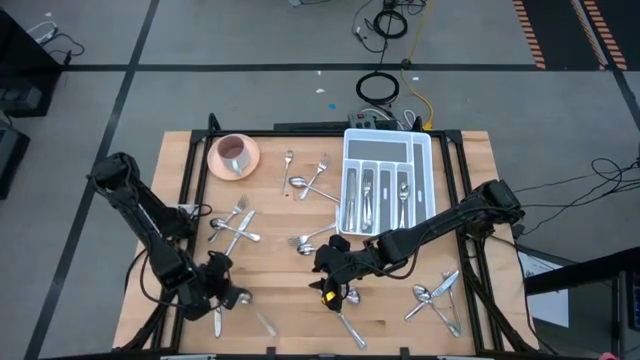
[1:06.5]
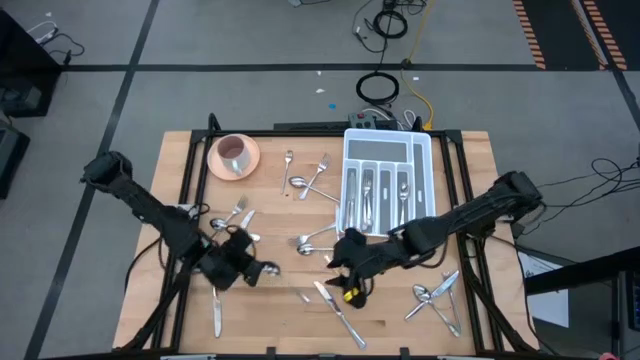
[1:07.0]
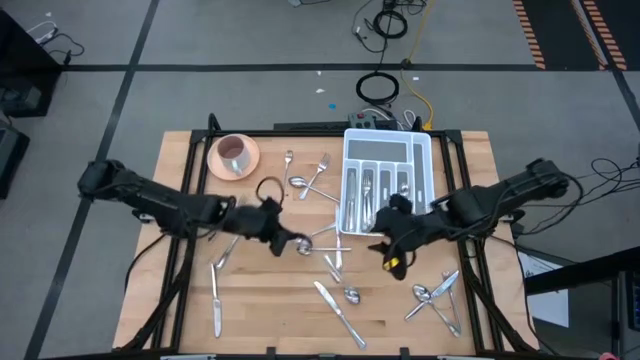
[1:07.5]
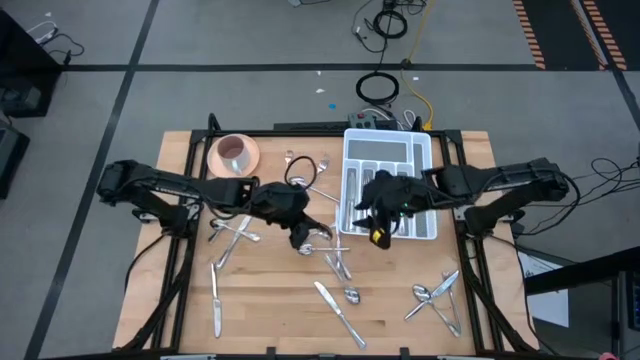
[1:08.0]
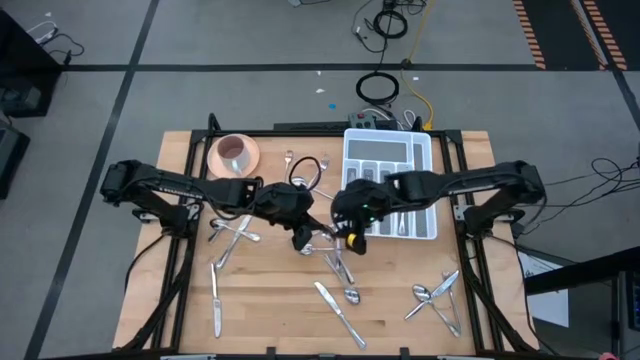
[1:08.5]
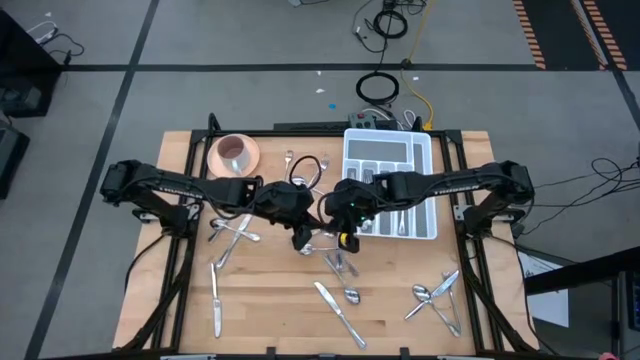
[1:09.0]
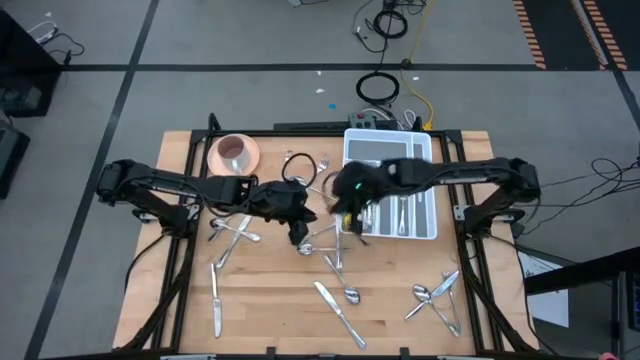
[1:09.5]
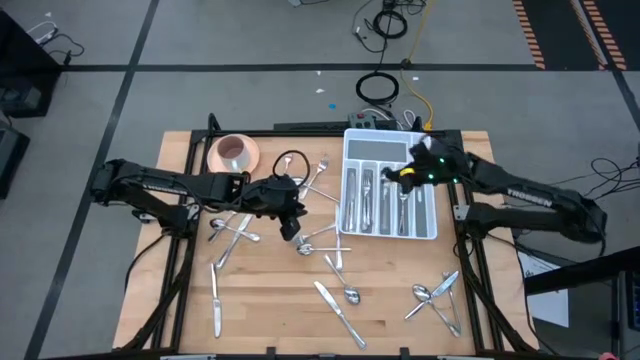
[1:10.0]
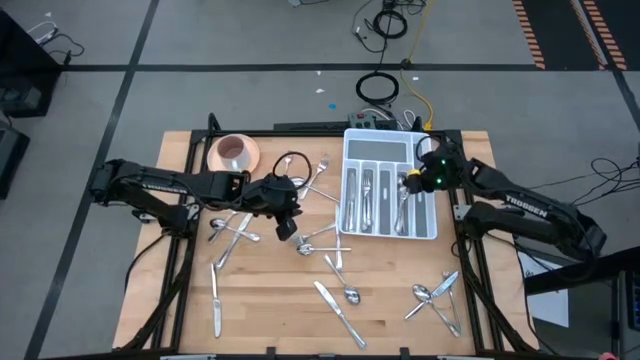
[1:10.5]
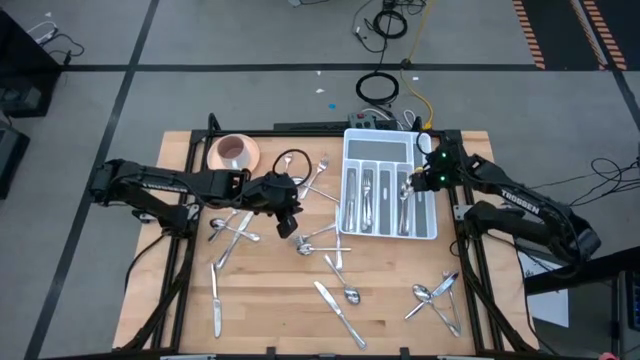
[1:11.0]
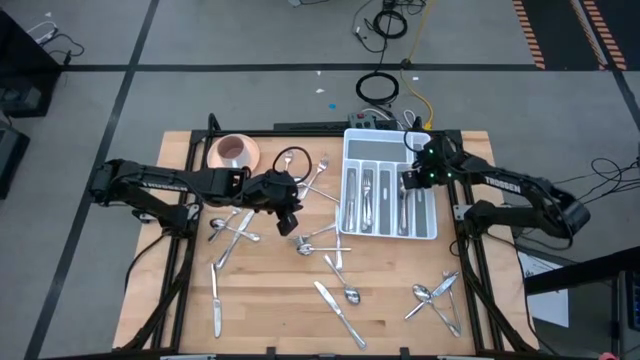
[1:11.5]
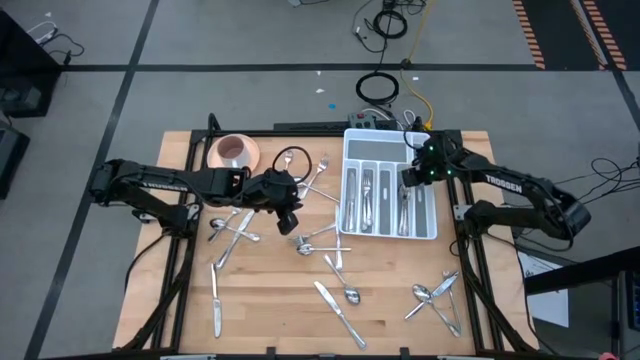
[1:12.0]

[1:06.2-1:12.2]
Task: Sort silverware
Put the silver spoon into the white silverware tray

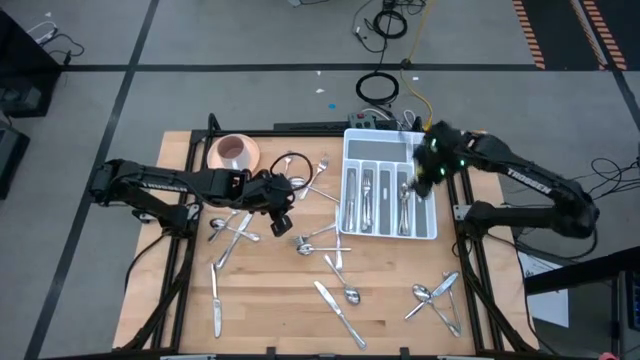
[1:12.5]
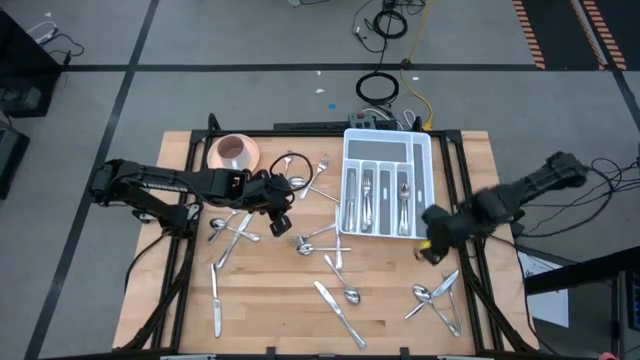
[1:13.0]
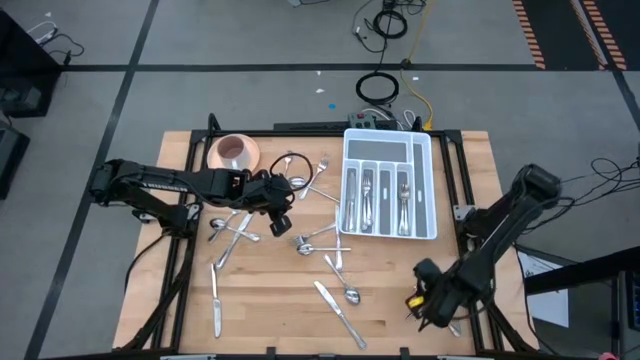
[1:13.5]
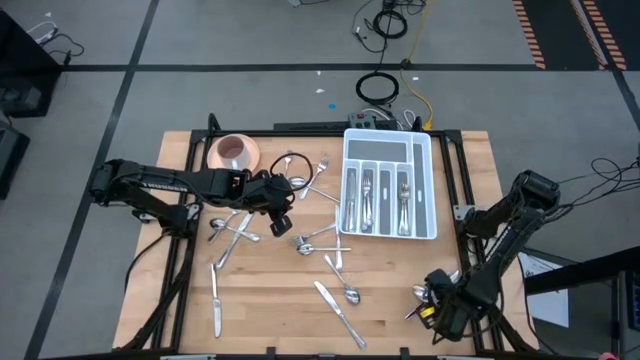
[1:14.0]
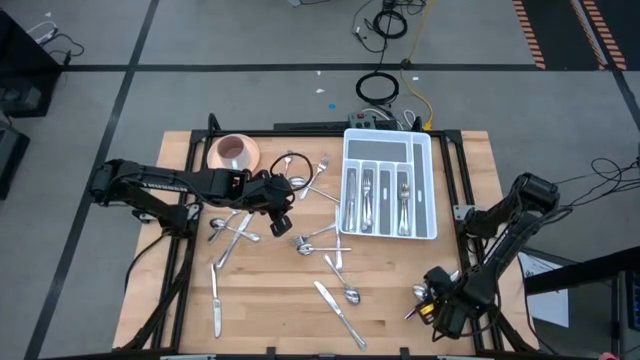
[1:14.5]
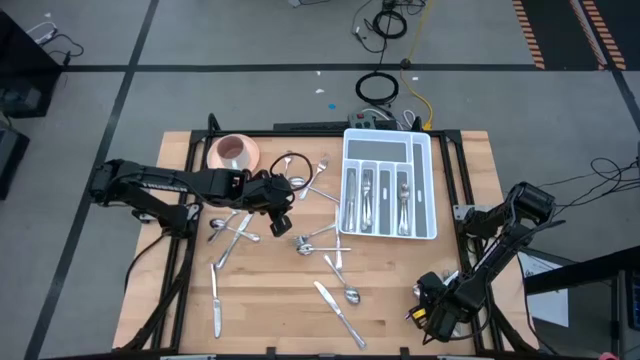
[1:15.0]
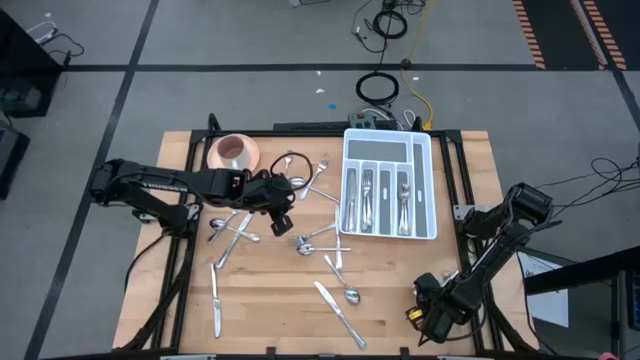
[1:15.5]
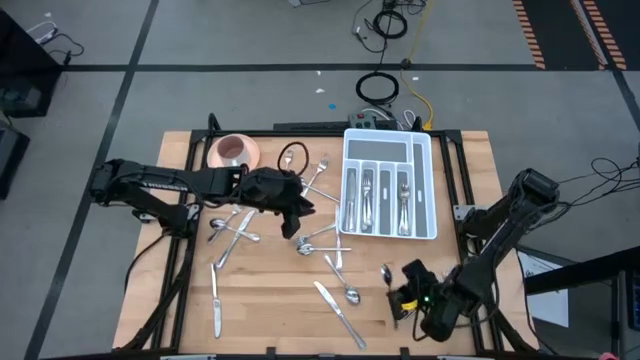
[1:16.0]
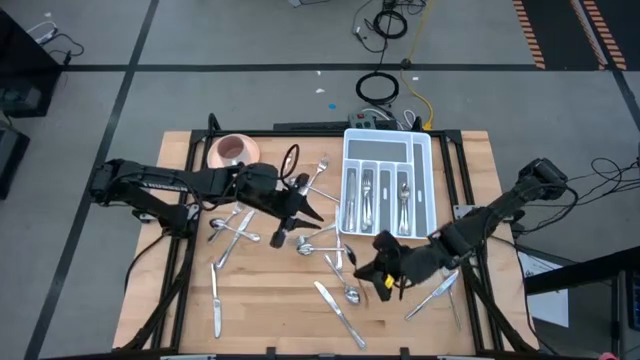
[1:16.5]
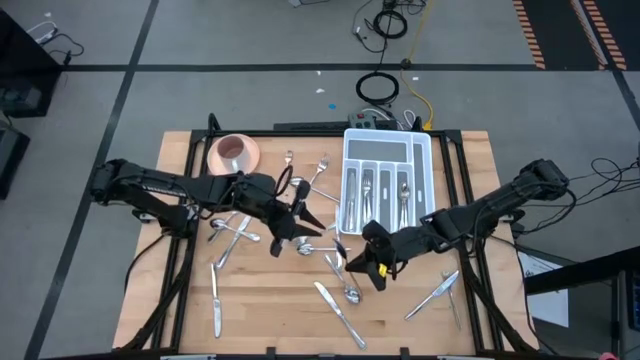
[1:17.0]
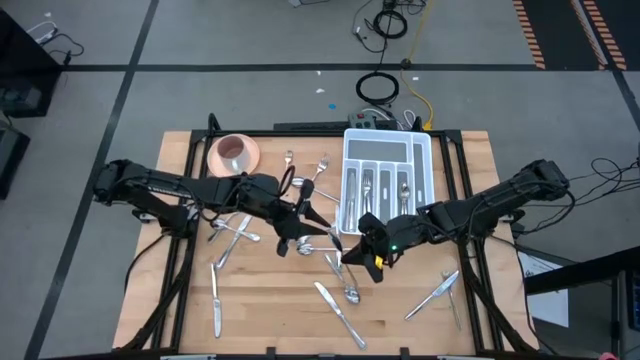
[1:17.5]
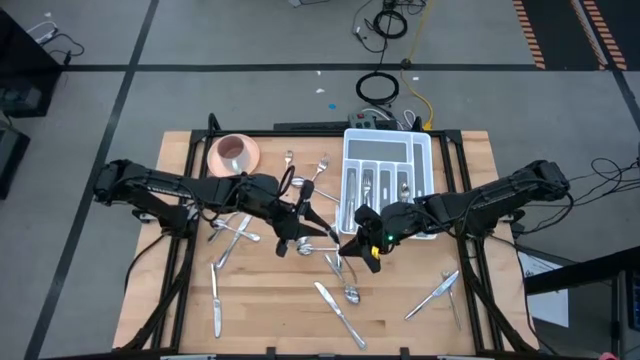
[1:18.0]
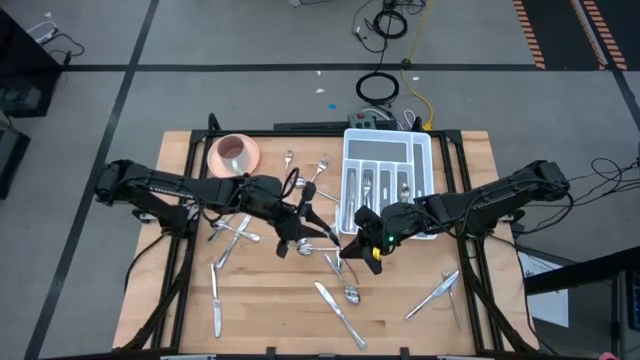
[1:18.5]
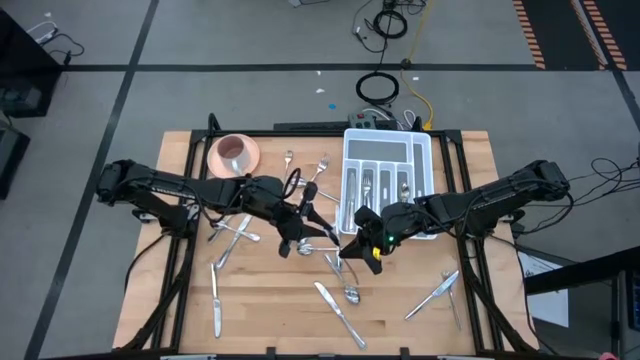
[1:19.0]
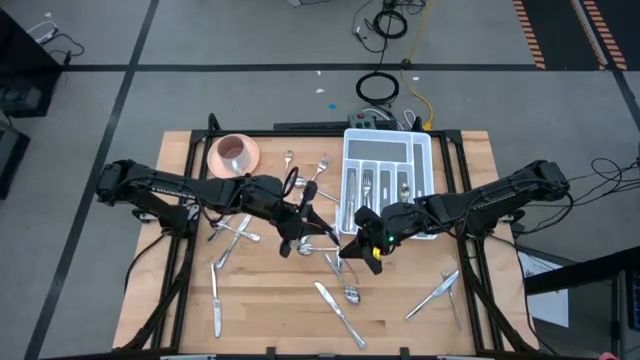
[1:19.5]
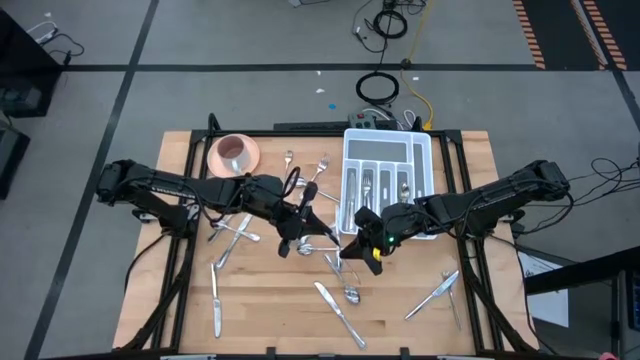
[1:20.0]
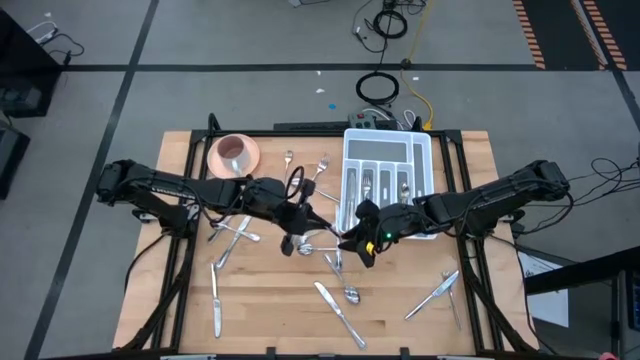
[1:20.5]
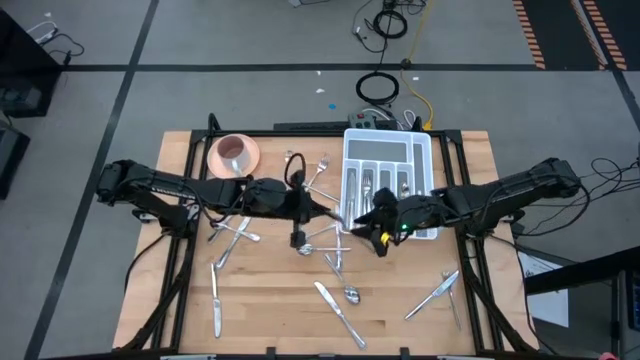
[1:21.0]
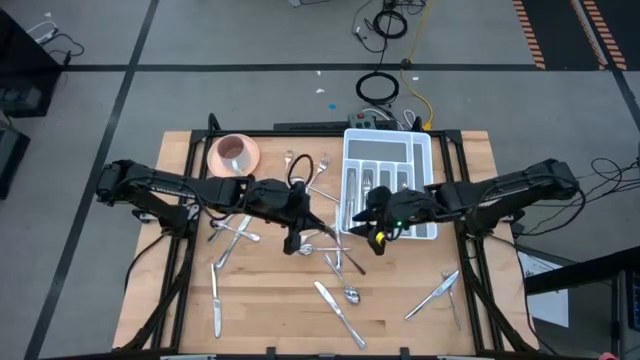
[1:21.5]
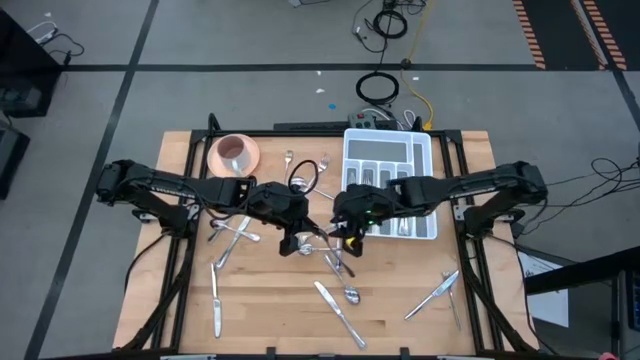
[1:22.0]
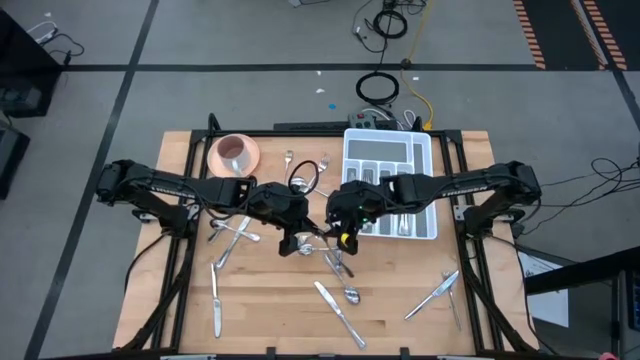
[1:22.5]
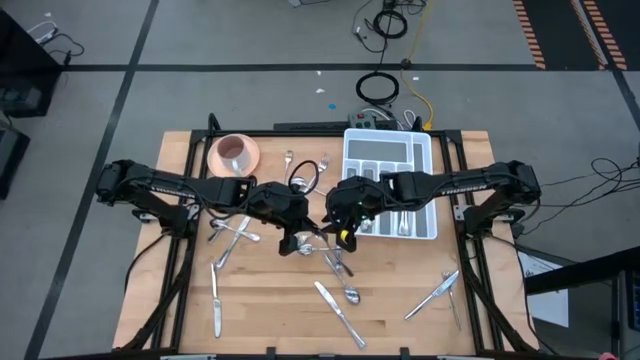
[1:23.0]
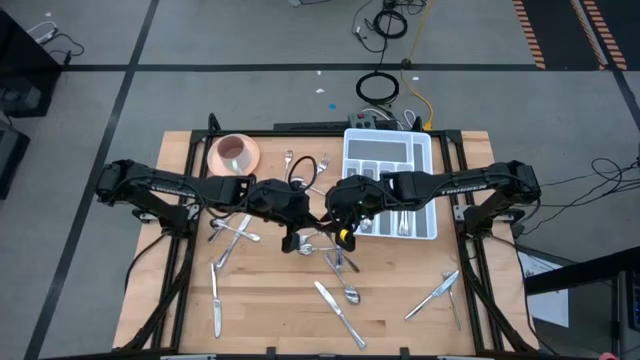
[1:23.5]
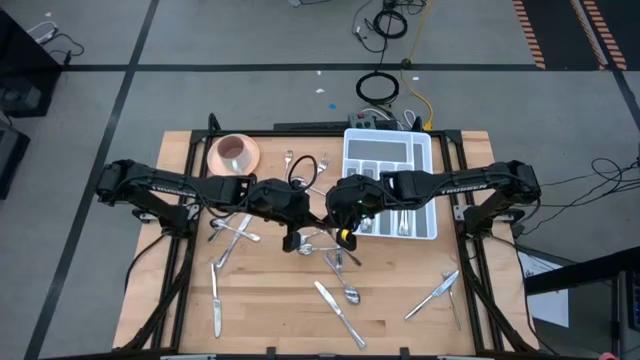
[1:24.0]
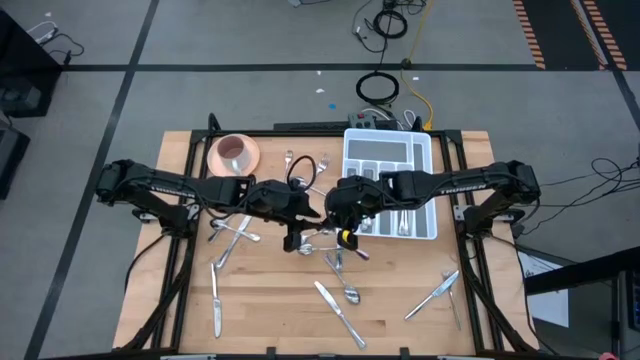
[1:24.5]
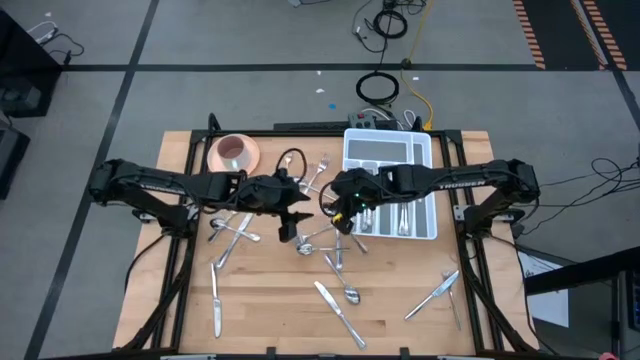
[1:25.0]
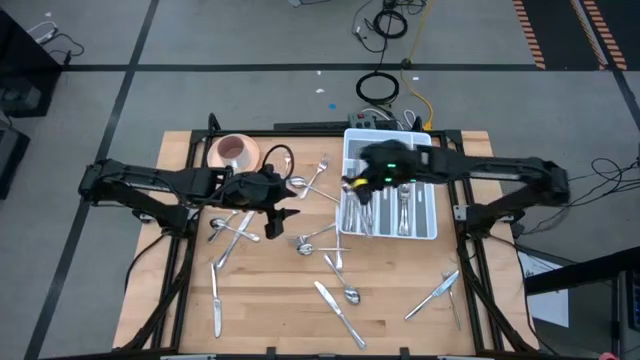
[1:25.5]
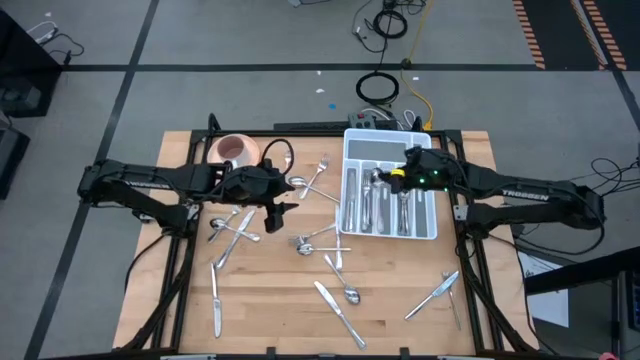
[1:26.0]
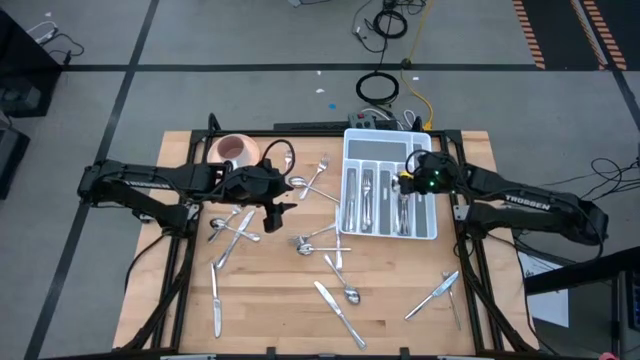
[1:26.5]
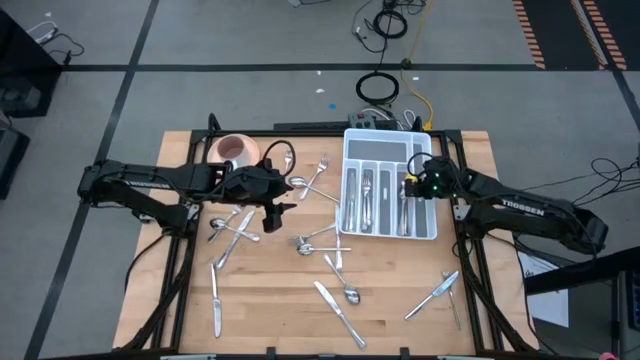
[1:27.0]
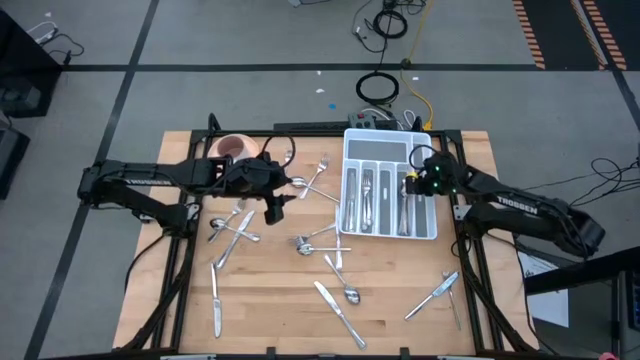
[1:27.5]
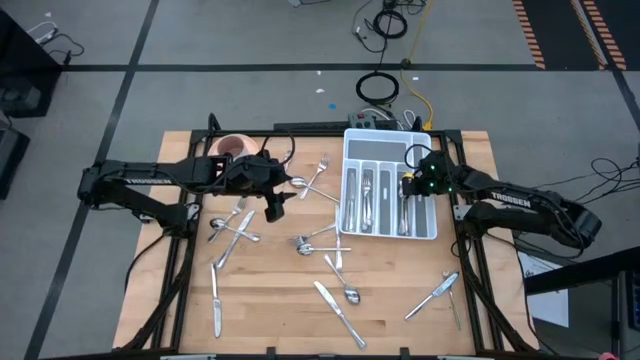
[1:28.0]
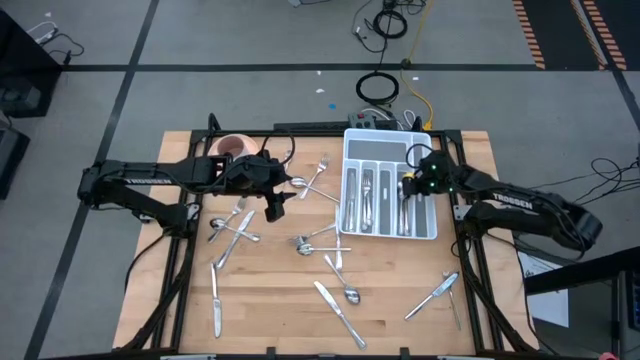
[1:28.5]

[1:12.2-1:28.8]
Put the silver spoon into the white silverware tray
